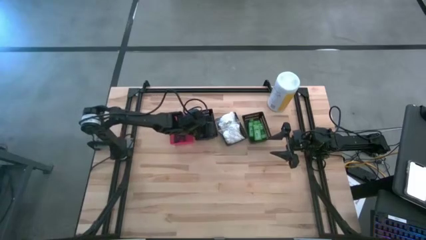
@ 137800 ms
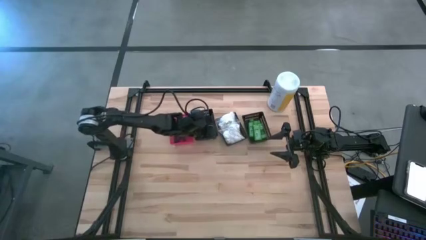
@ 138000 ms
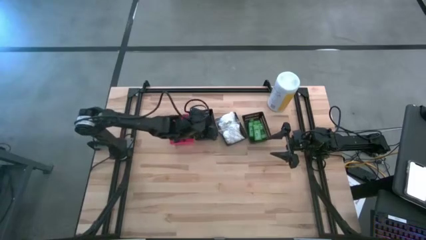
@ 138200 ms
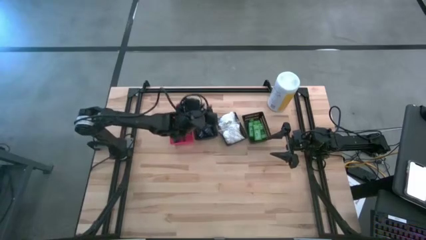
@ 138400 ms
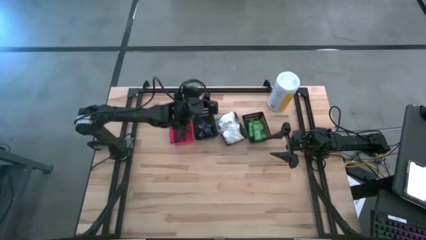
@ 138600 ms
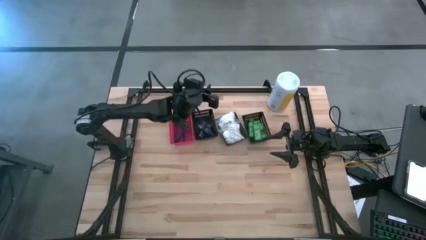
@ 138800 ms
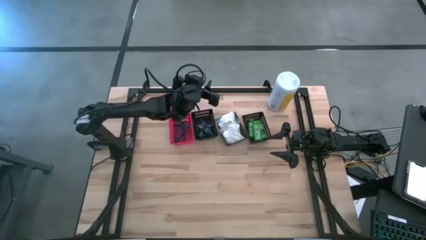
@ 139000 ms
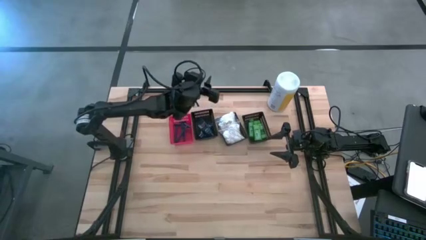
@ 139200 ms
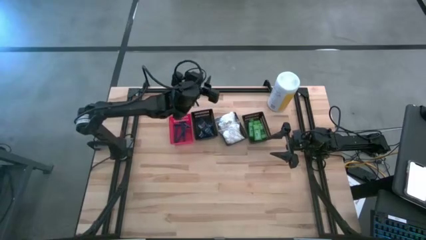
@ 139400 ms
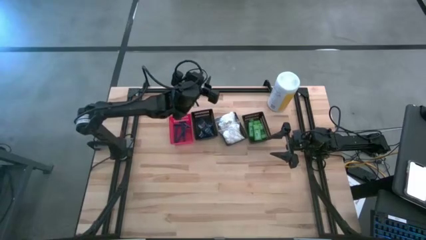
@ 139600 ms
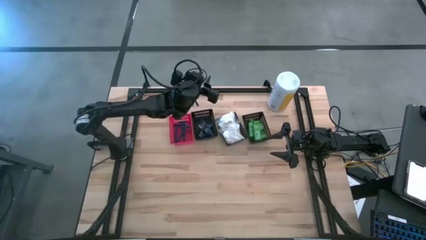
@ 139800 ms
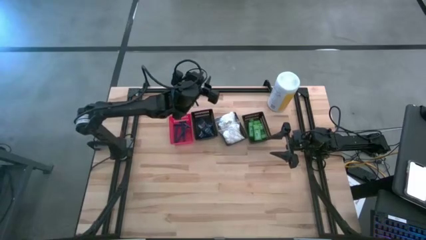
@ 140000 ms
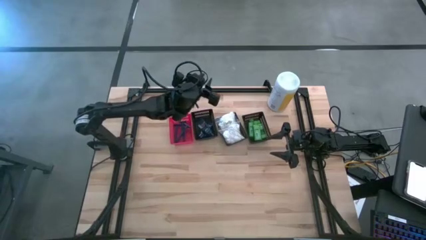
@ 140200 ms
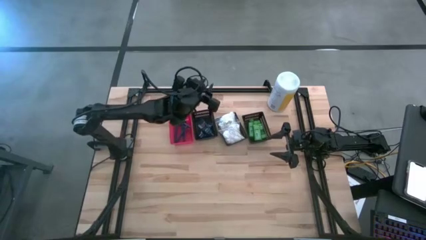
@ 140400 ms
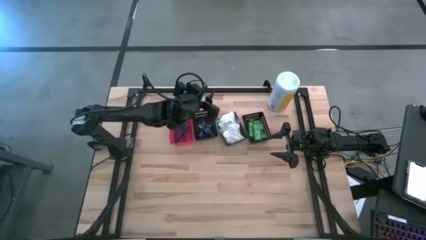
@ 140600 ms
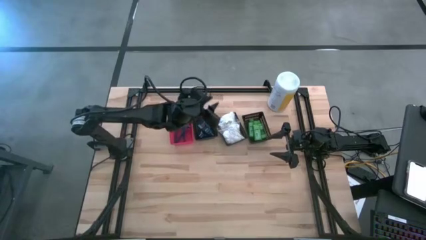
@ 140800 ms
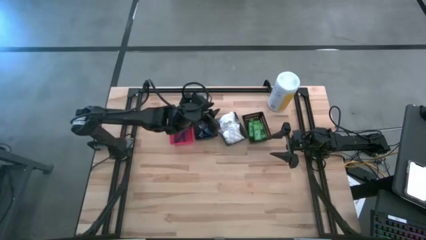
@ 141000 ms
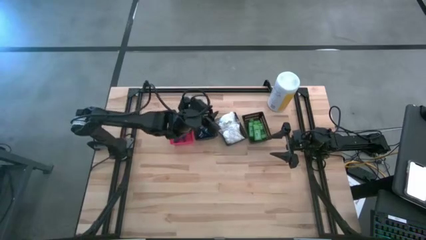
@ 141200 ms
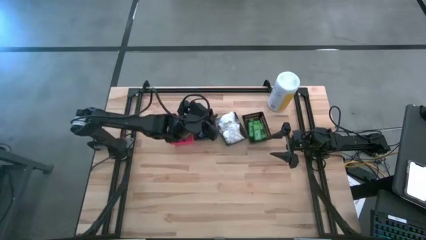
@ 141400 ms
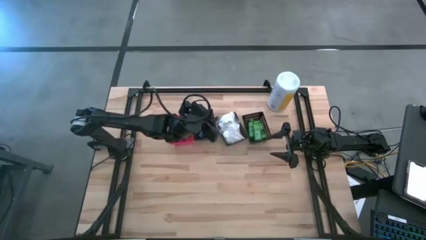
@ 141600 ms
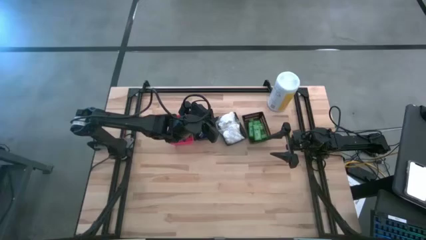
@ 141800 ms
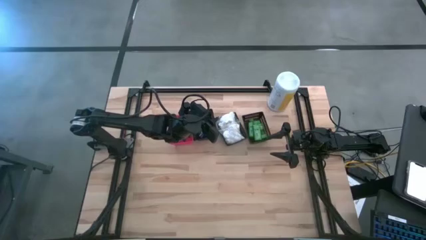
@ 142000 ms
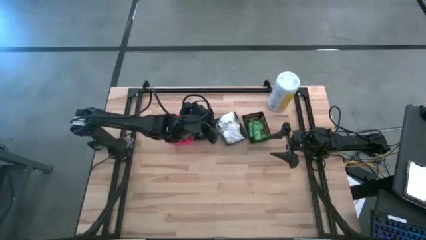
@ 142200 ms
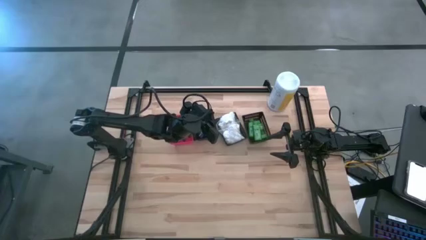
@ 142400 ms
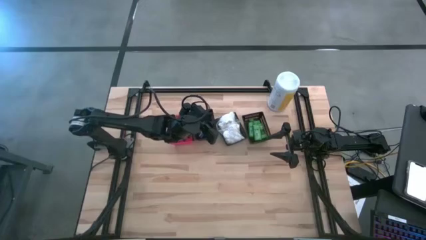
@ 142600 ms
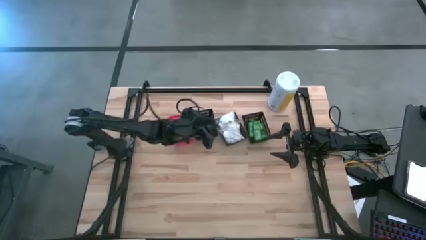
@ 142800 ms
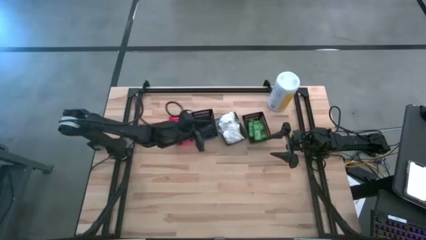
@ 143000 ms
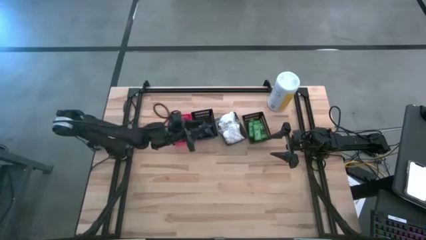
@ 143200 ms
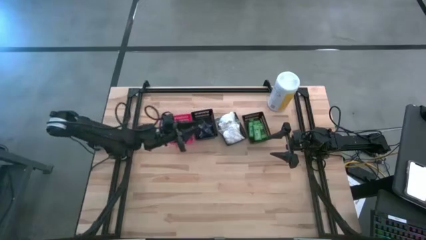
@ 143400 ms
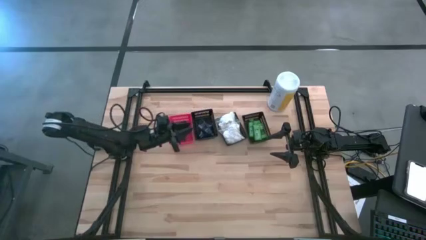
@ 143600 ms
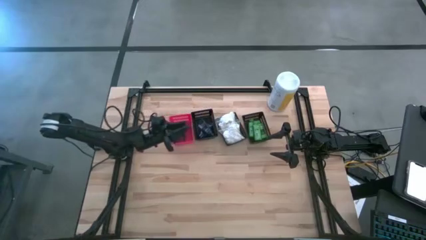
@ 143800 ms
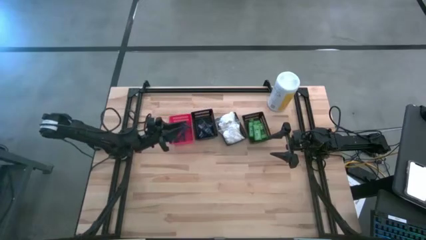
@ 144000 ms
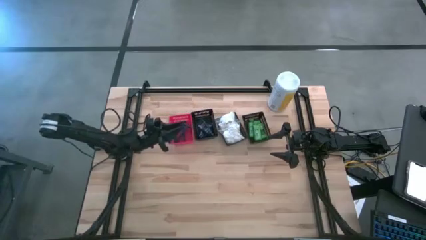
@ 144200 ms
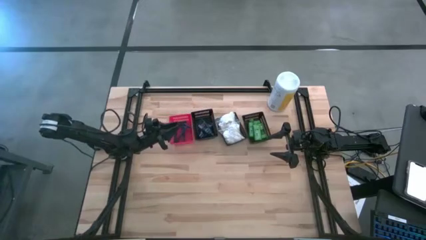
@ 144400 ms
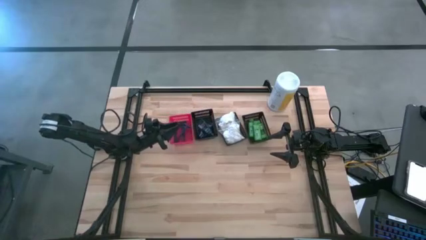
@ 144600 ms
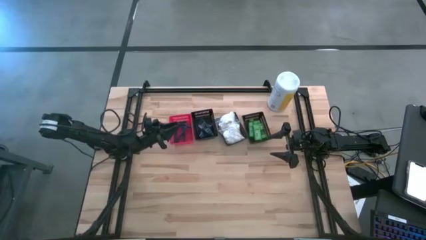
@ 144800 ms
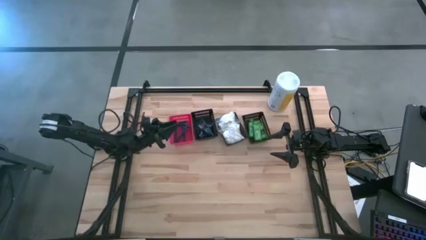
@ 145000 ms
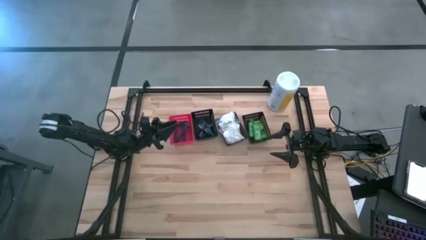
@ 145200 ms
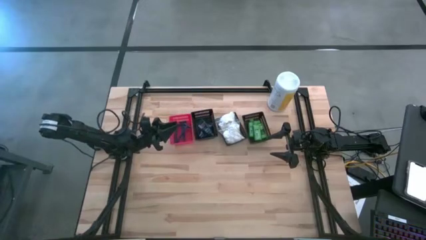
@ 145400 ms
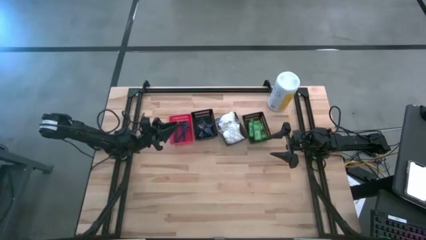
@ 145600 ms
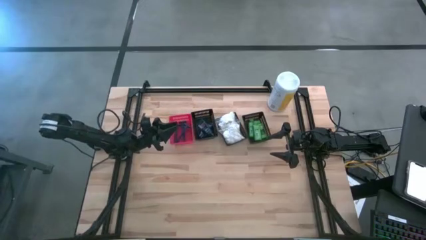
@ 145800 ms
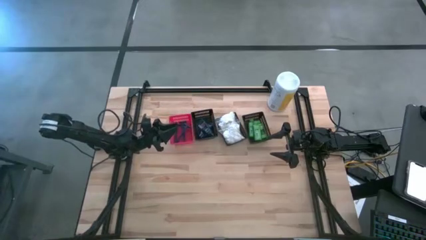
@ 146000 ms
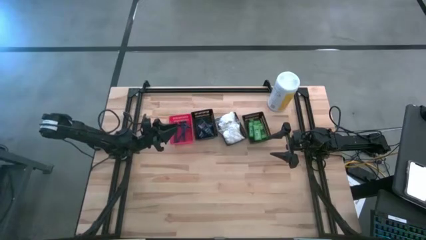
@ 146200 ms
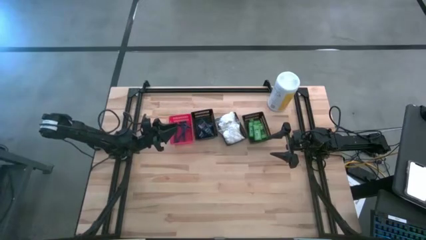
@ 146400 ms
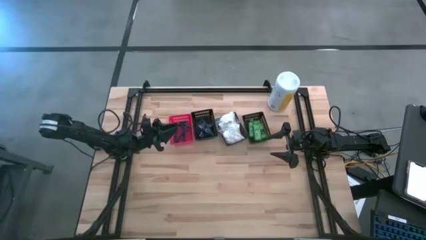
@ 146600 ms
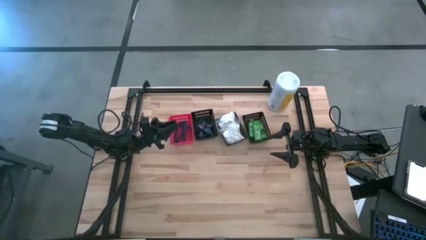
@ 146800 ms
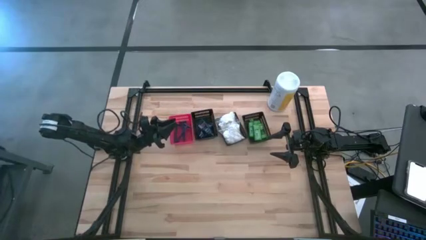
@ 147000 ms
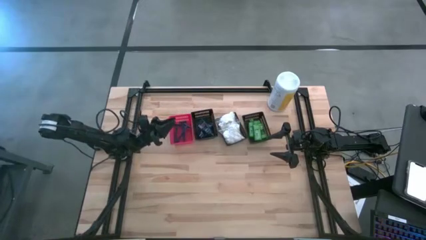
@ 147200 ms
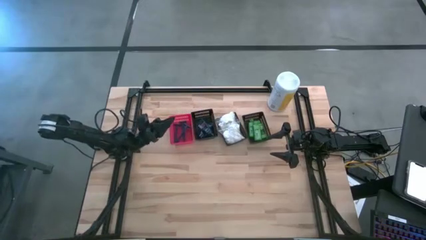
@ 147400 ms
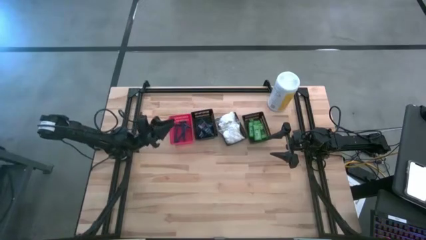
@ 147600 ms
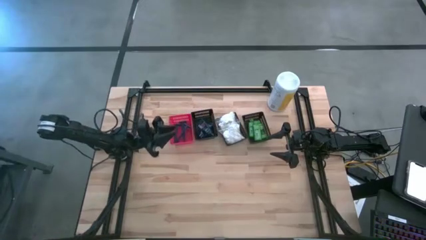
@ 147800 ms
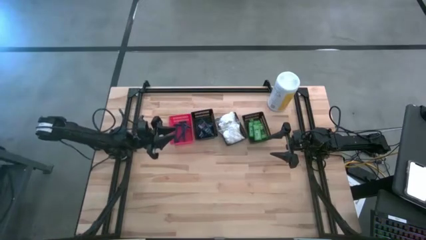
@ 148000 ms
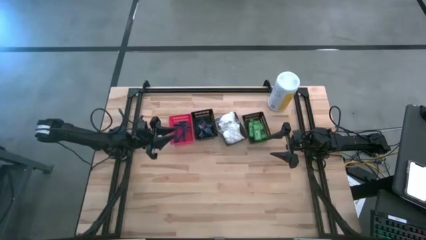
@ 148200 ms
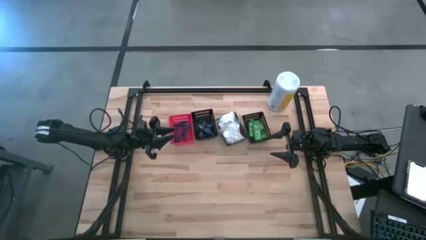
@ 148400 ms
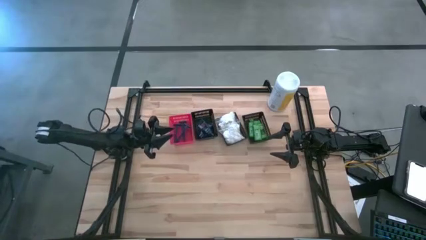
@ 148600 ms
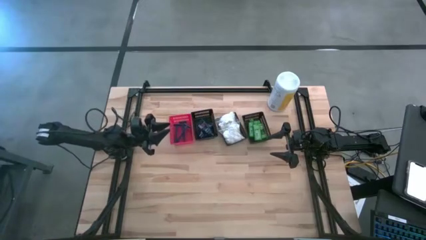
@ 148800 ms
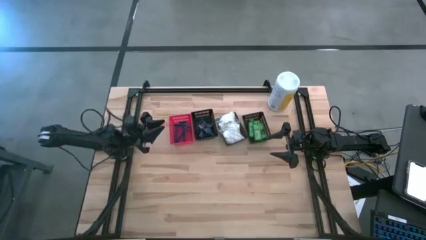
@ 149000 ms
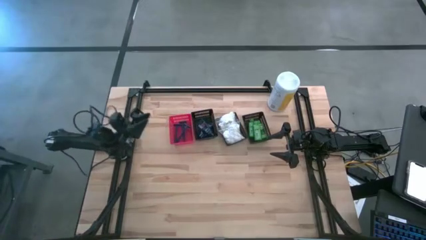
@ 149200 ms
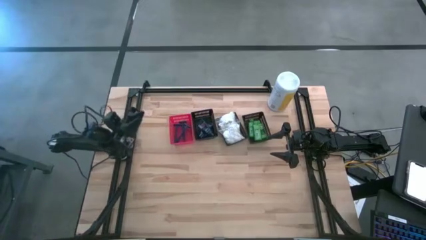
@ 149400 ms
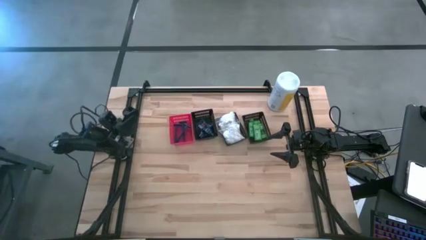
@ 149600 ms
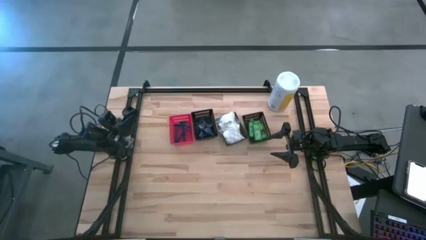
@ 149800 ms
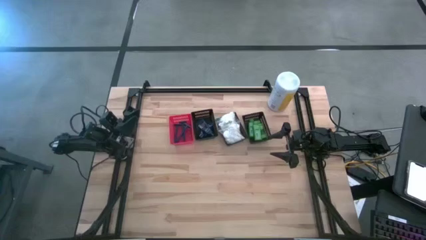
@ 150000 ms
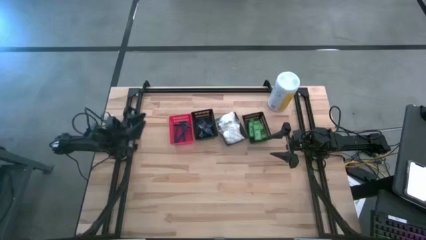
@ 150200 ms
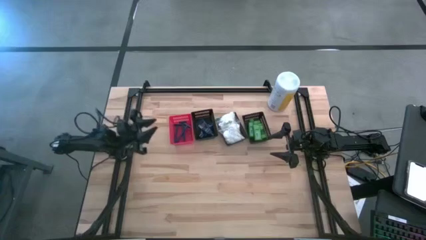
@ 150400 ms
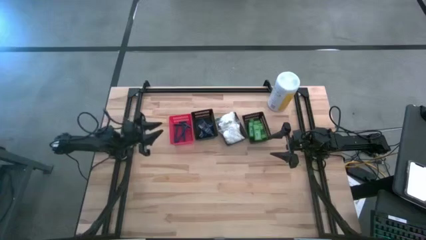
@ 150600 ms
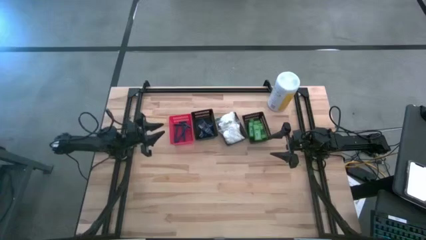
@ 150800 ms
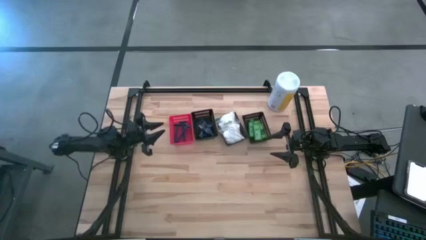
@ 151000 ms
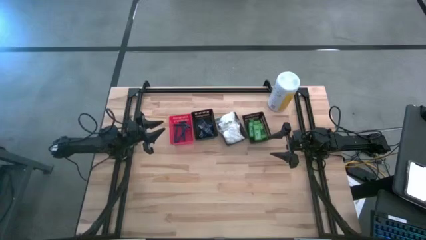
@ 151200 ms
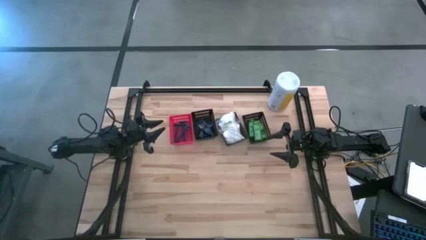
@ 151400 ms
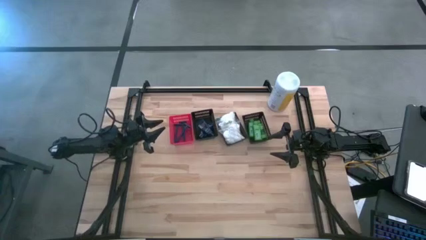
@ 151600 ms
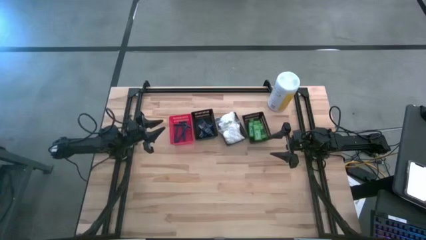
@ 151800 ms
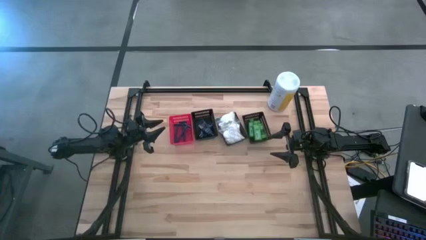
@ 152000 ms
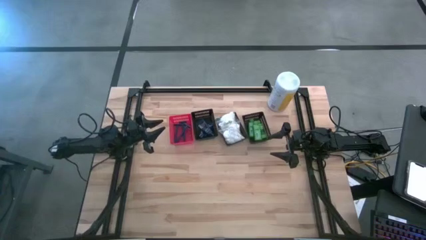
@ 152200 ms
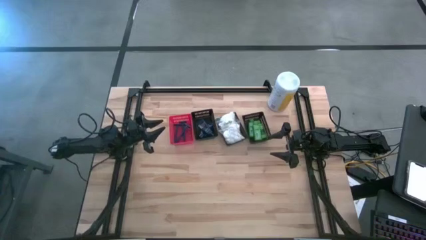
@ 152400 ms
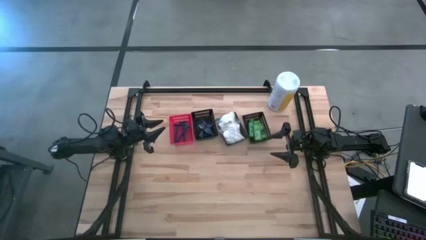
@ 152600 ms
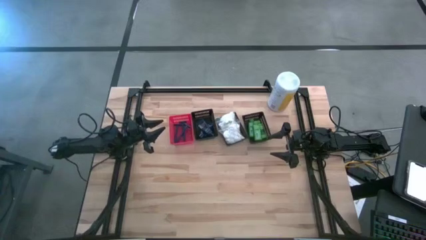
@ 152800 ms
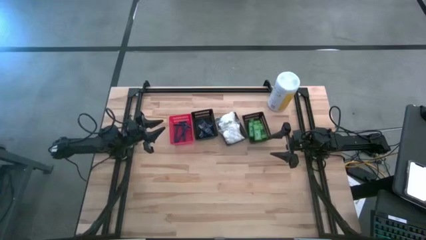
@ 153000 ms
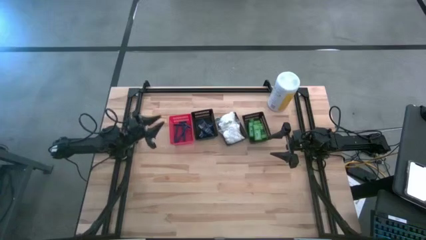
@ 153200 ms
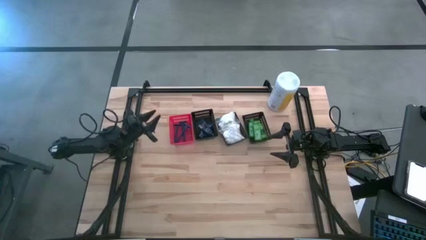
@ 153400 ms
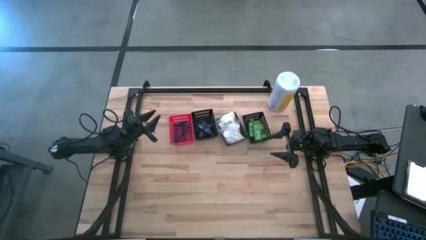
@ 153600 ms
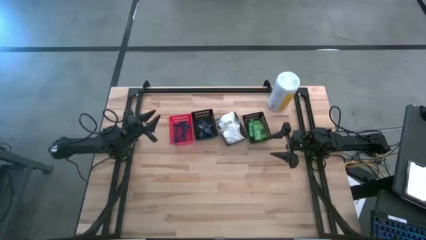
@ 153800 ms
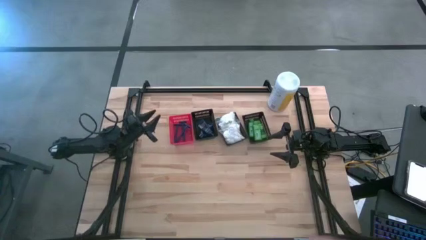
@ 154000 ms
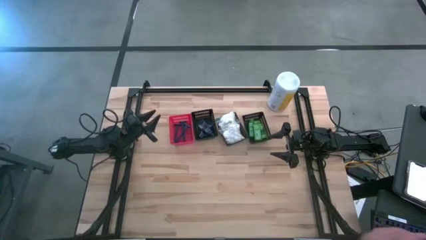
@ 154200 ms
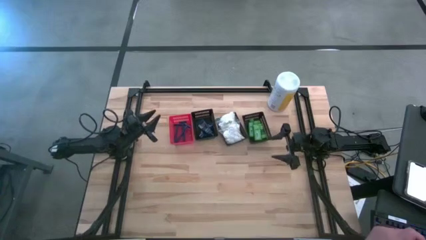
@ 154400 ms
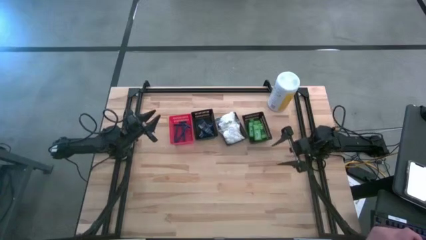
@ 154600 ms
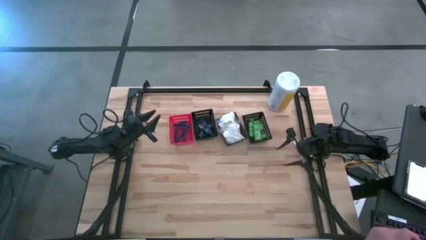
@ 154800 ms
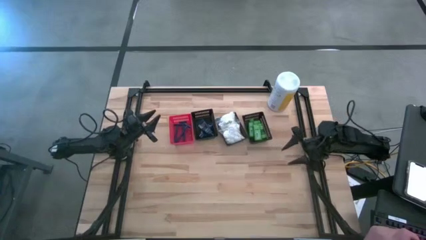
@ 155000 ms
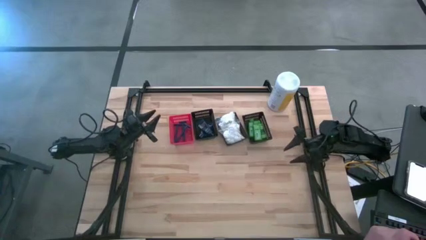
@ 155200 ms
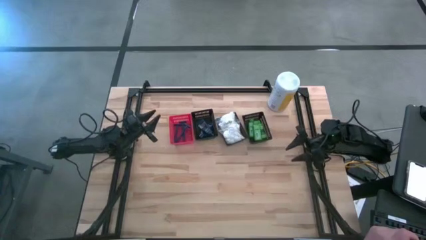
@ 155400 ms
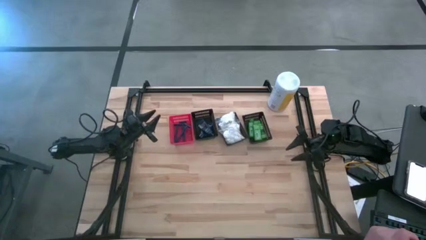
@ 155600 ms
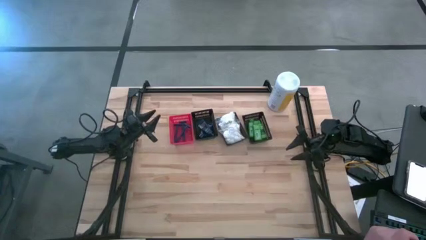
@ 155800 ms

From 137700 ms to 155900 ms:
Task: Pick & Place Travel size toiletries
Return to Home Position
